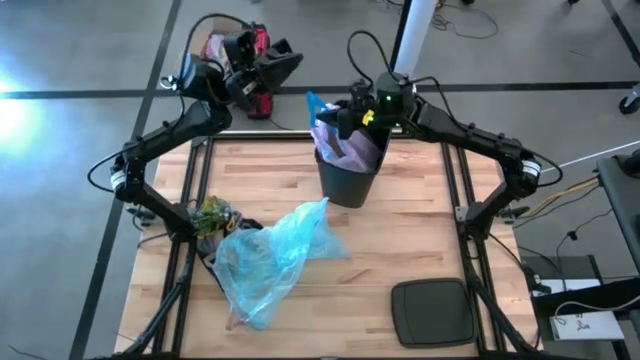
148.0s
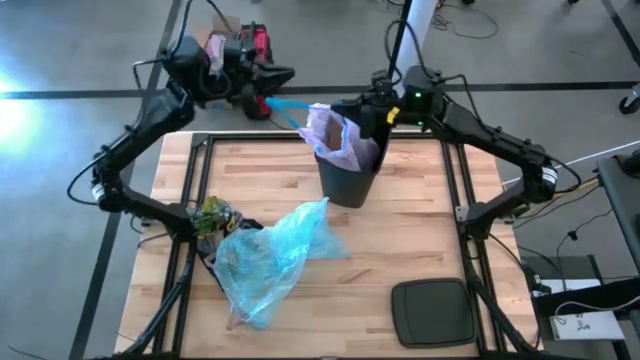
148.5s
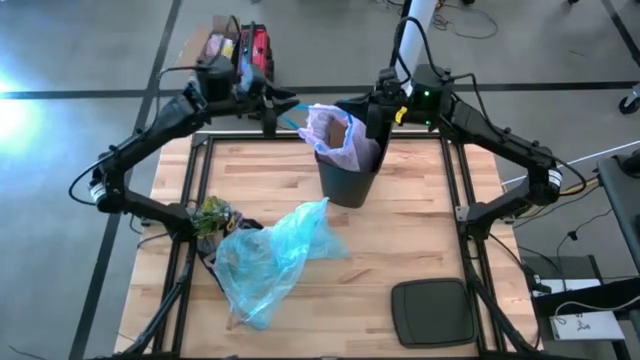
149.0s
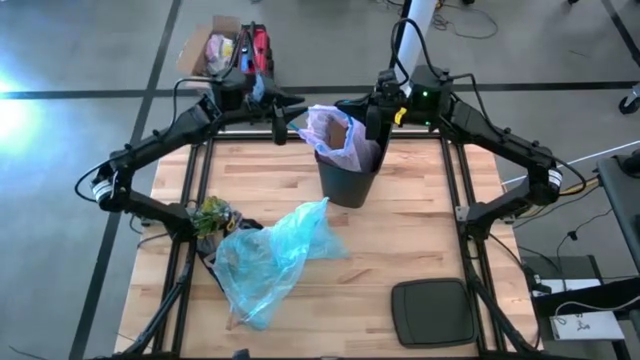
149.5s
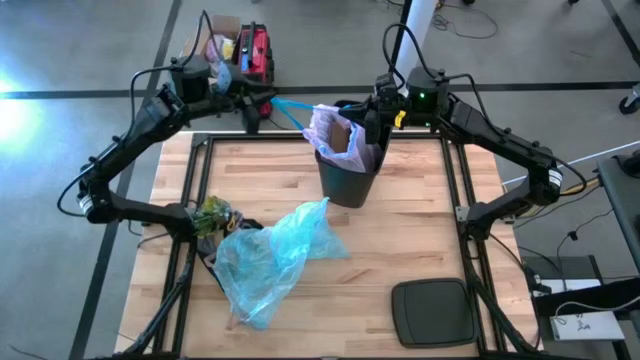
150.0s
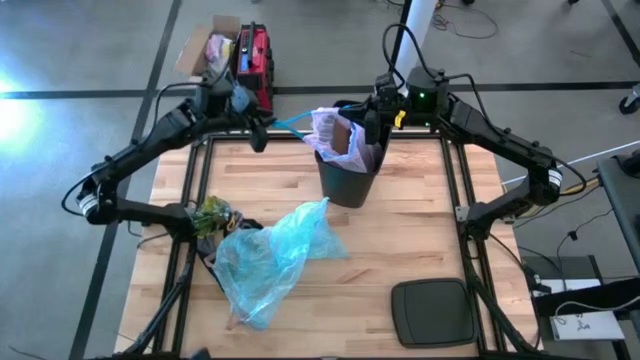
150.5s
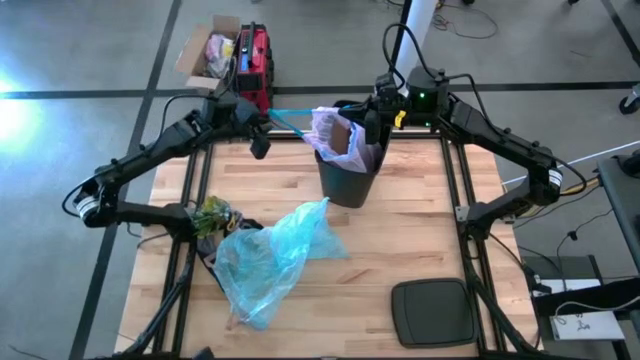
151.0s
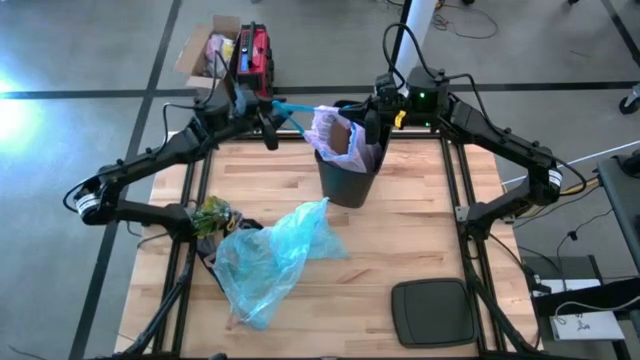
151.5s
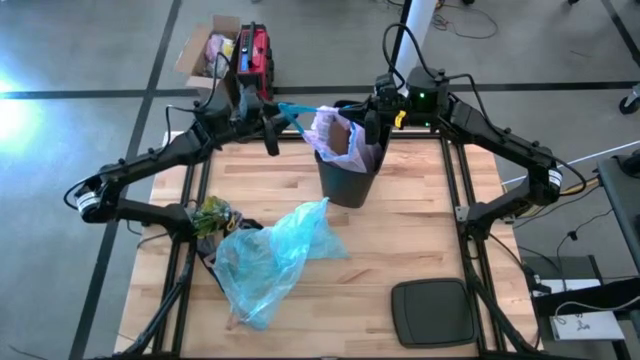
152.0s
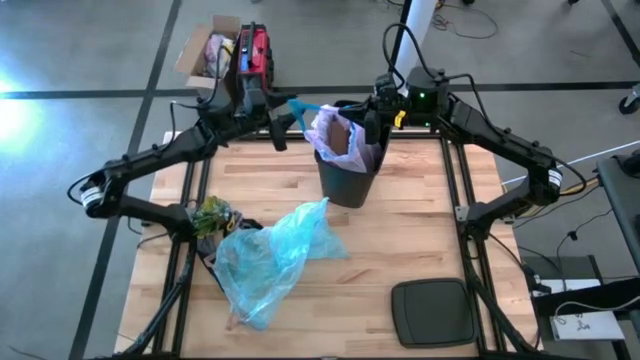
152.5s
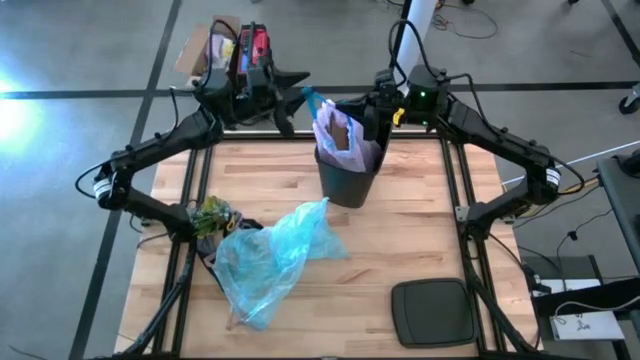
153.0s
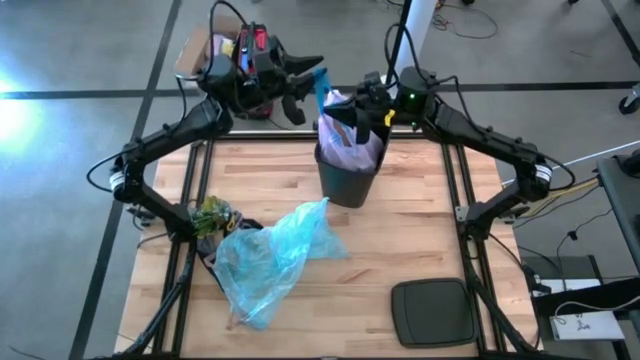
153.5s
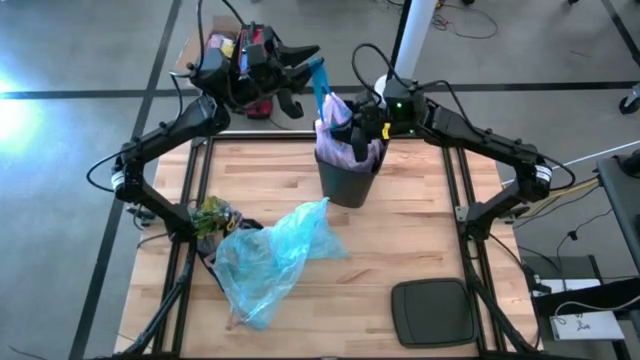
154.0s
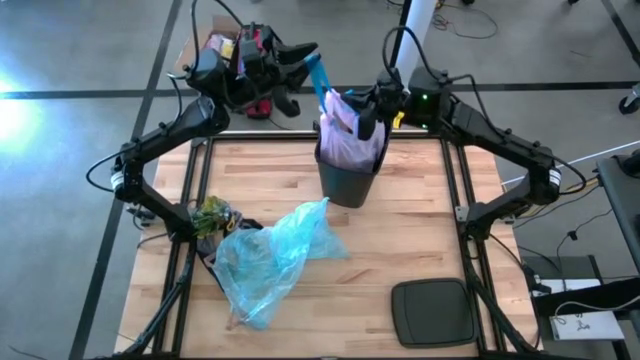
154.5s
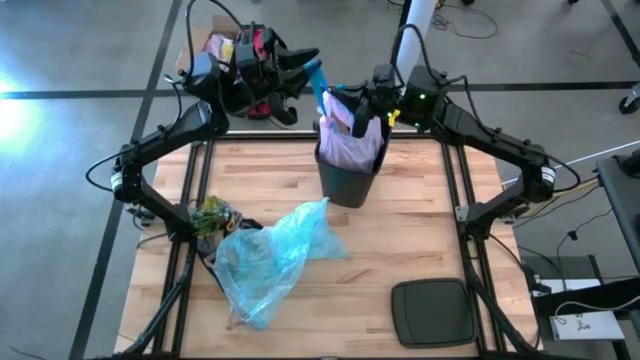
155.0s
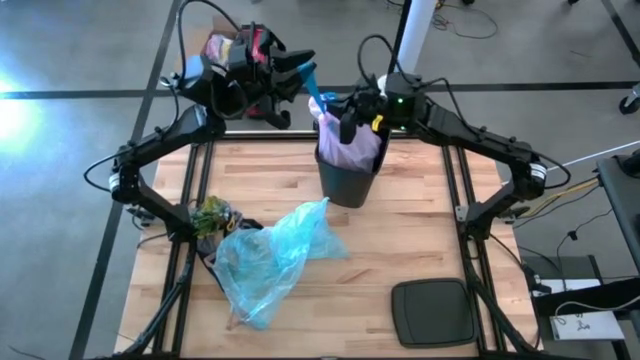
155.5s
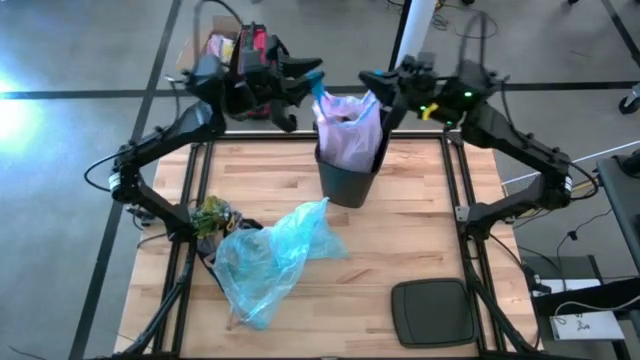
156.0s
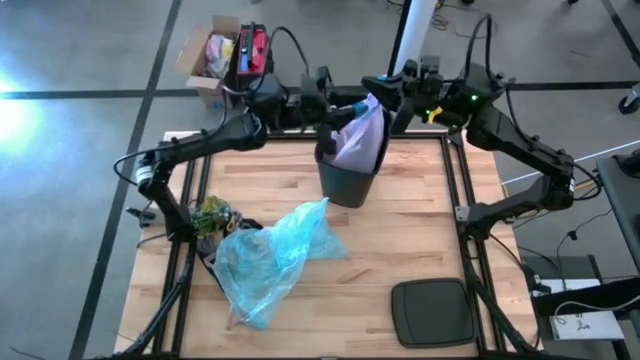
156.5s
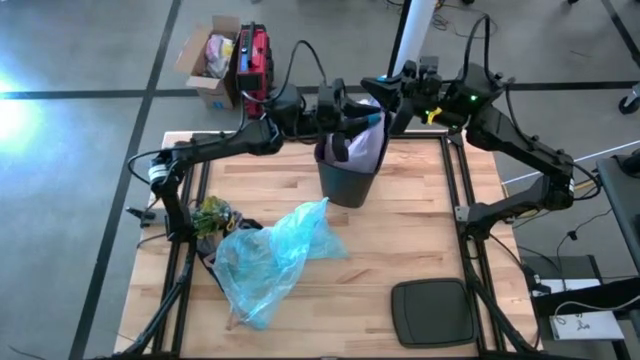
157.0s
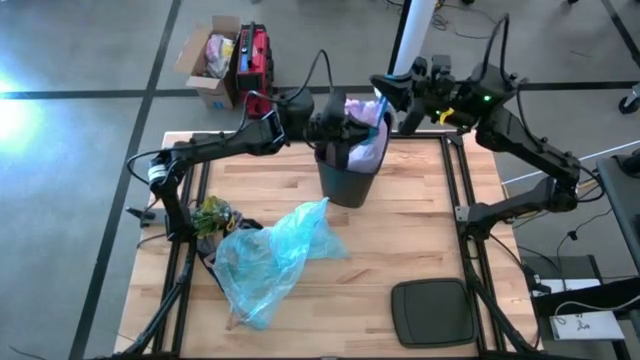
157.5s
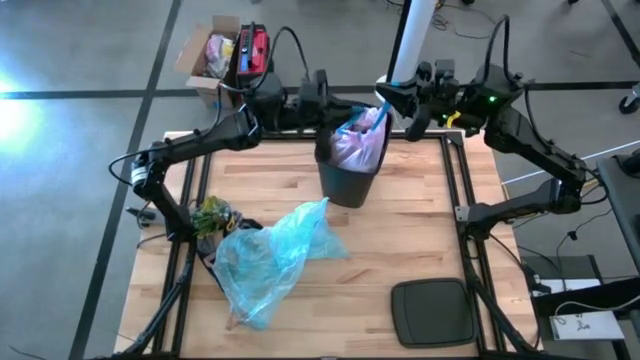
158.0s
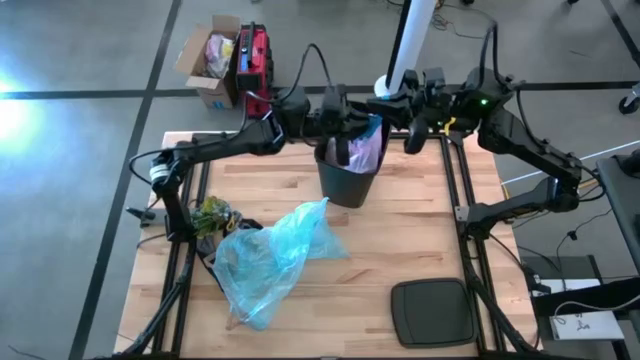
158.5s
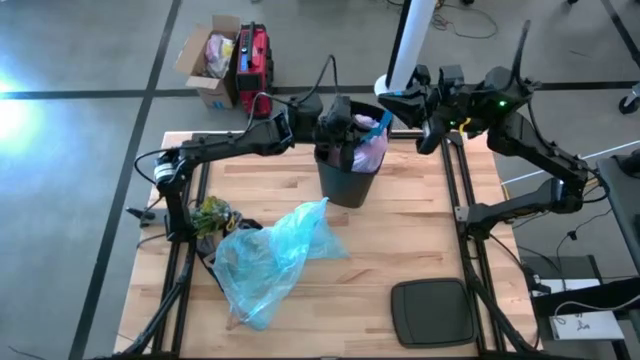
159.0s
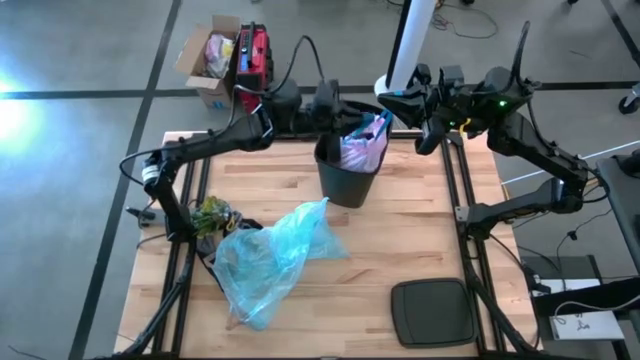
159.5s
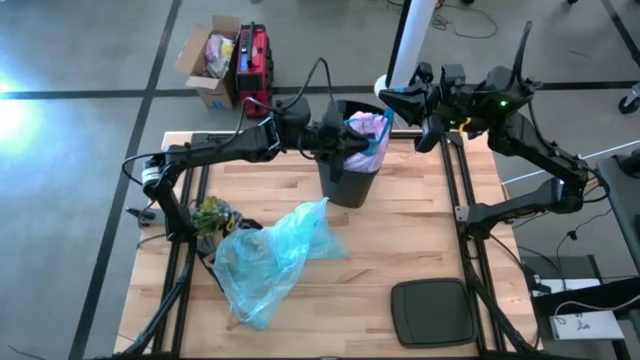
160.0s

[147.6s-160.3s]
Task: place trash/remove bag and relplace
Close the pink trash bag

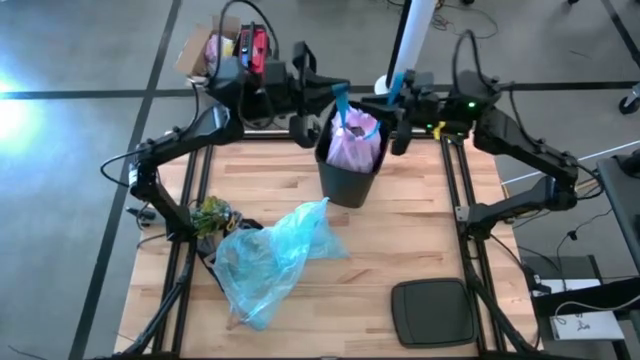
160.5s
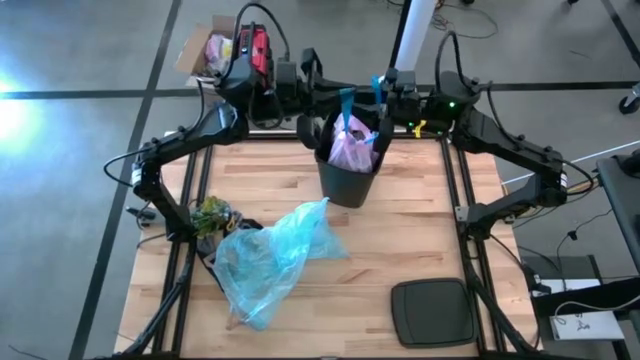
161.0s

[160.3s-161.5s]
Remove the pink trash bag from the trash bin

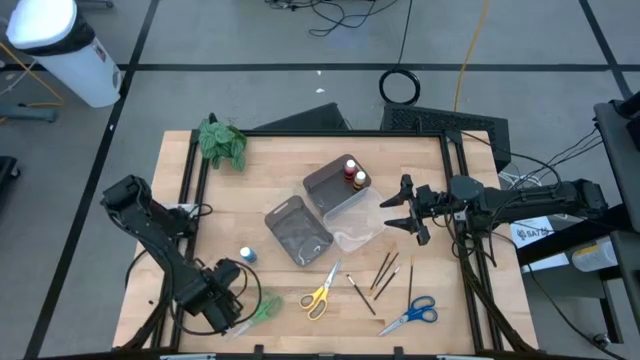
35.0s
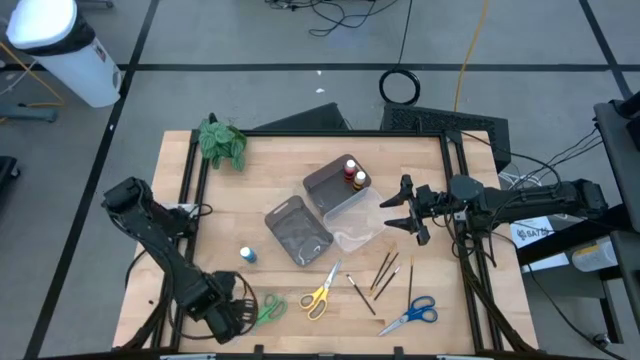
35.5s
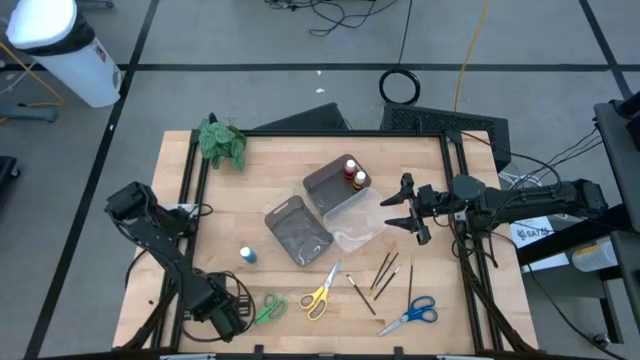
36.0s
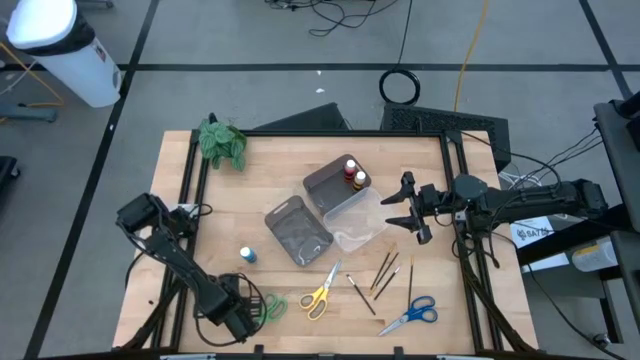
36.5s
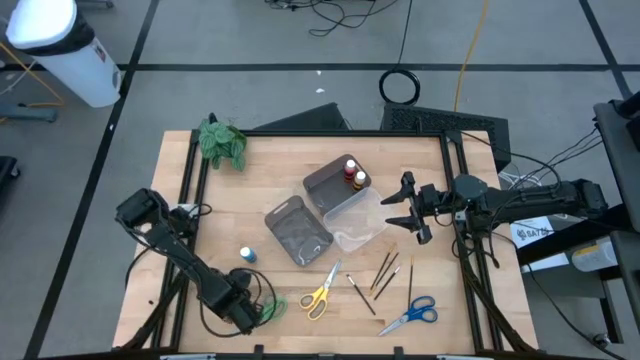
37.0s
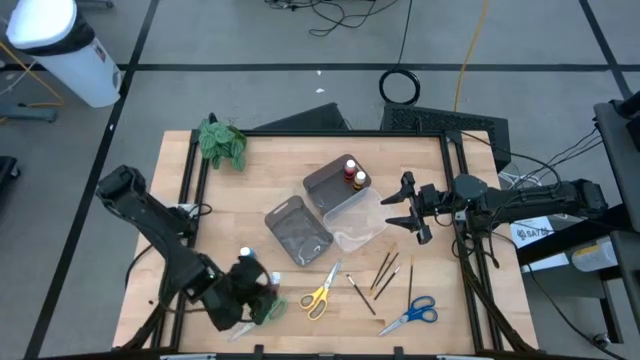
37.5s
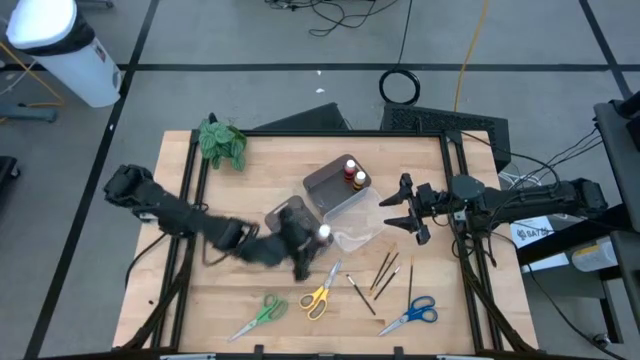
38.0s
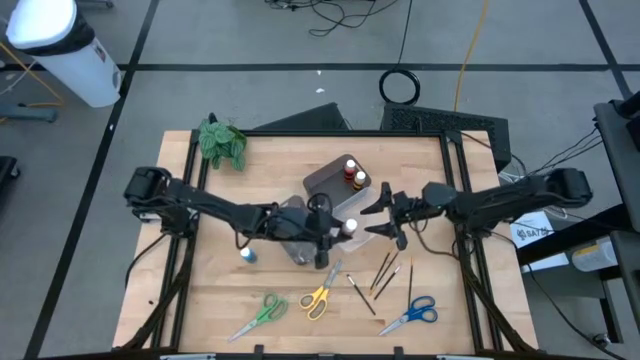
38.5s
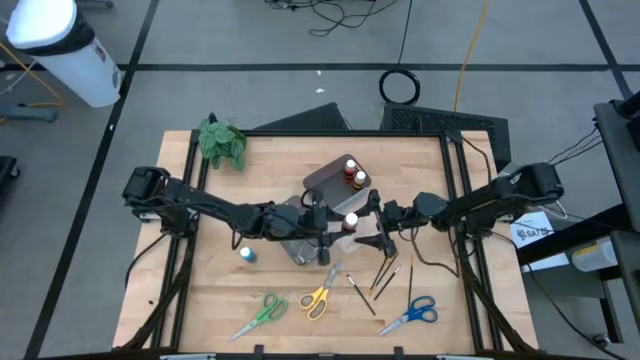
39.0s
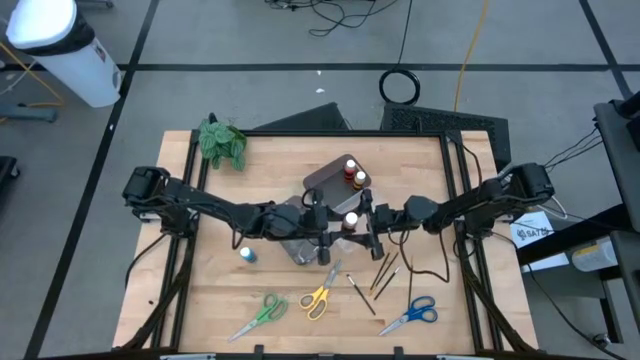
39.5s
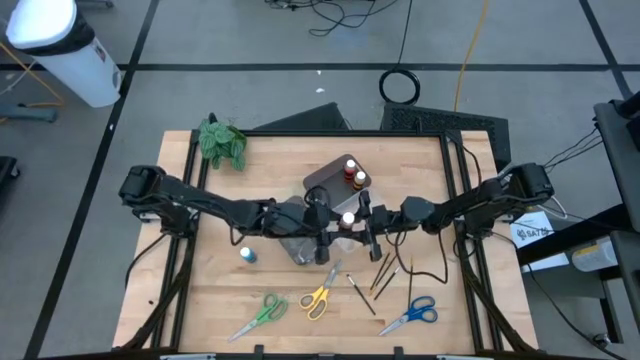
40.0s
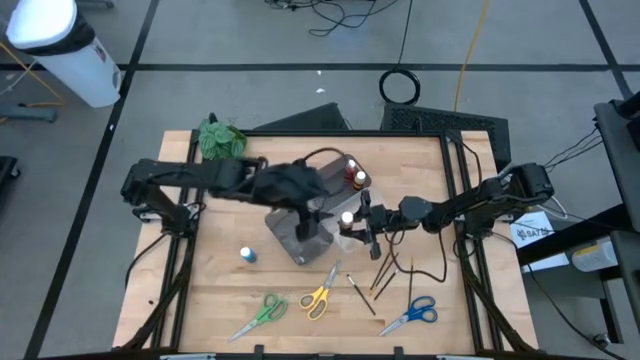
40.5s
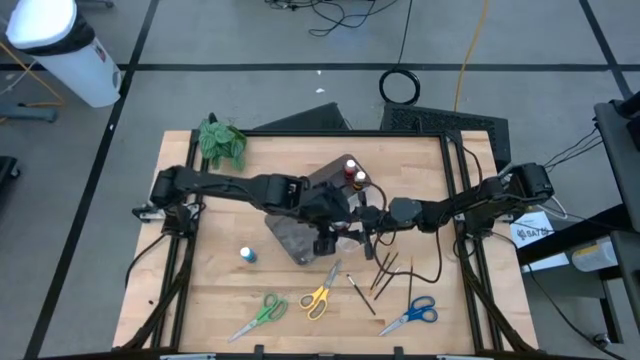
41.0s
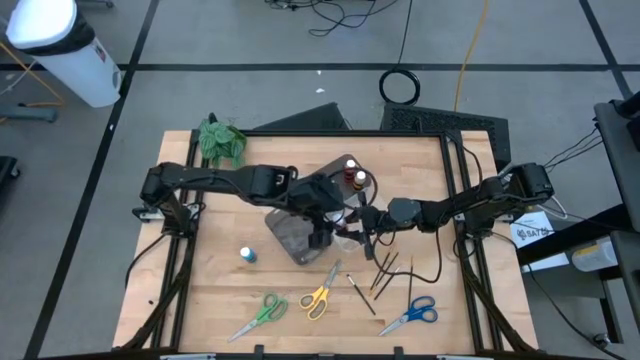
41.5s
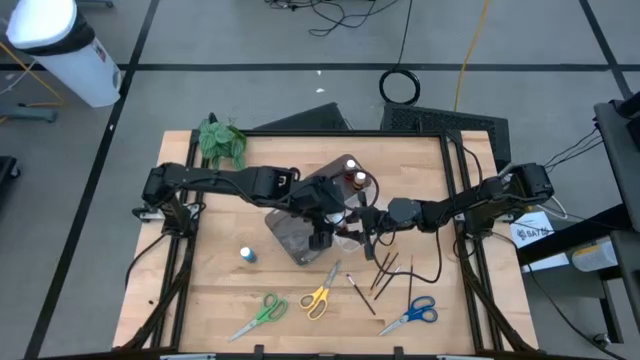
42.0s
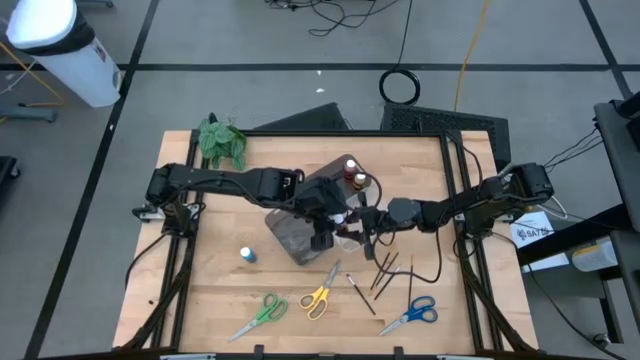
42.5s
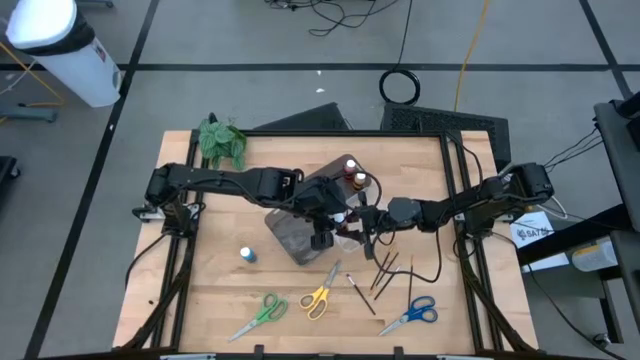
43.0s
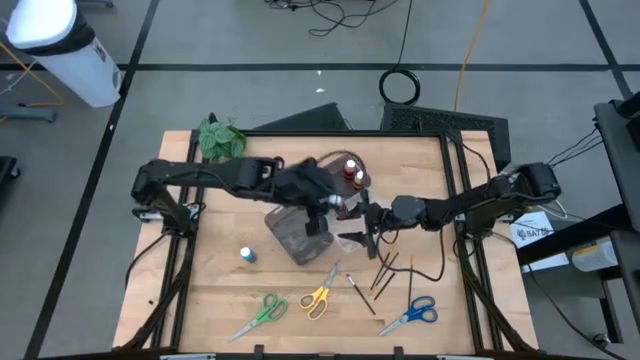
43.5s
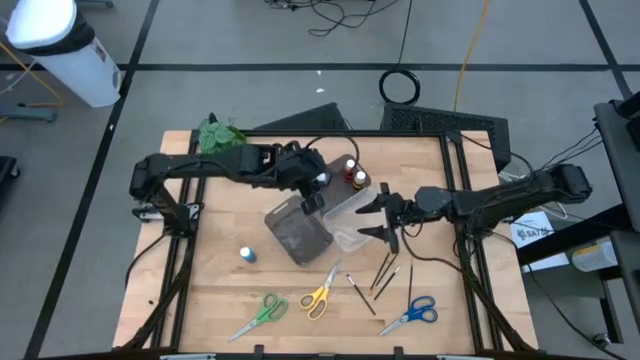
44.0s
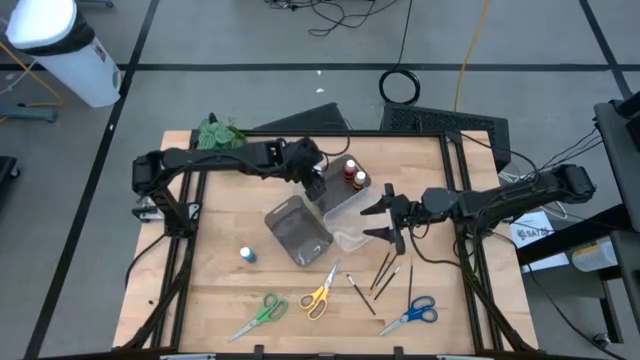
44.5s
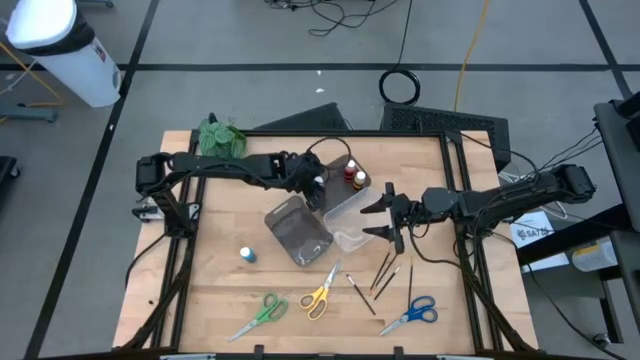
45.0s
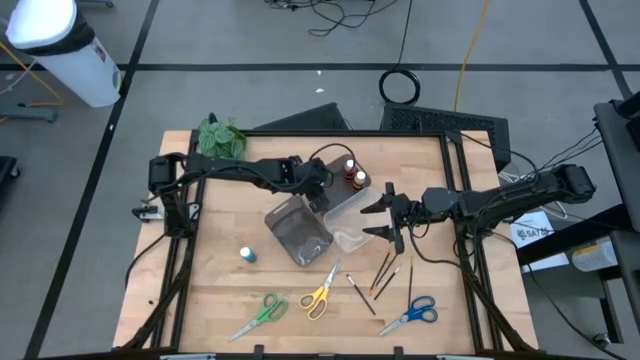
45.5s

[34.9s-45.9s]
Task: Pick & Place Paint Supplies
Put the brown paint bottle into the top black bin
